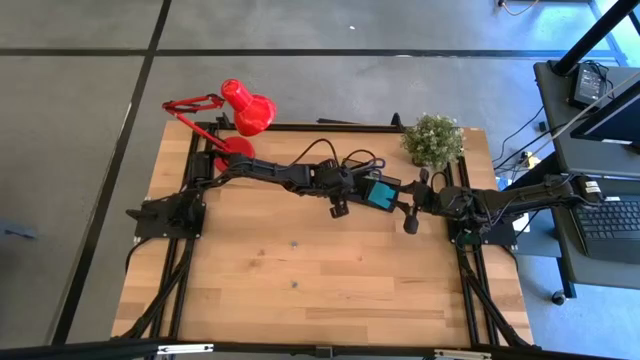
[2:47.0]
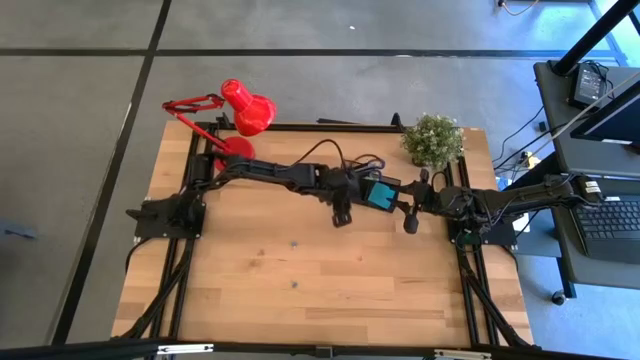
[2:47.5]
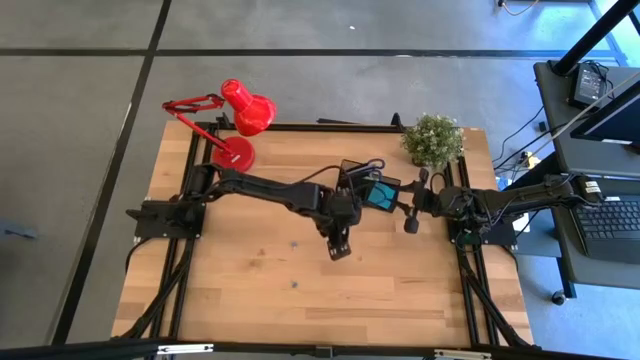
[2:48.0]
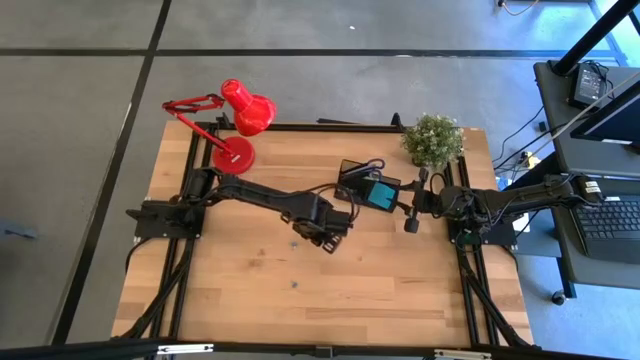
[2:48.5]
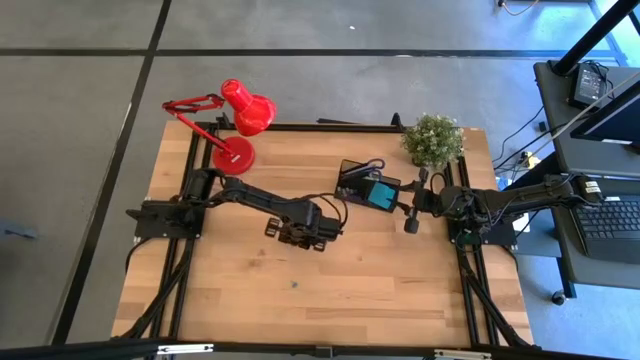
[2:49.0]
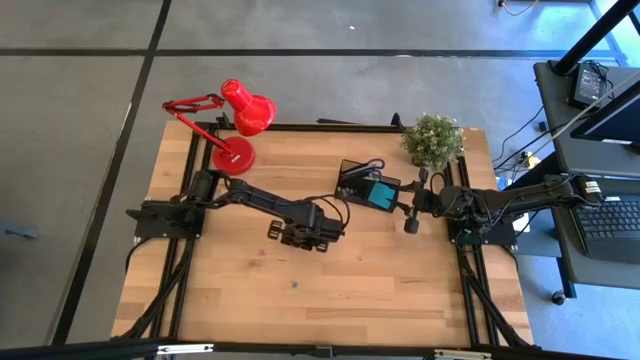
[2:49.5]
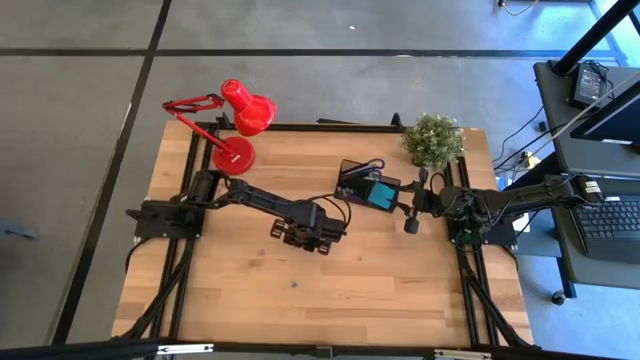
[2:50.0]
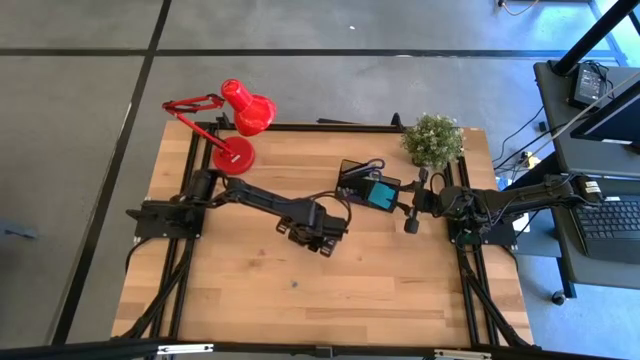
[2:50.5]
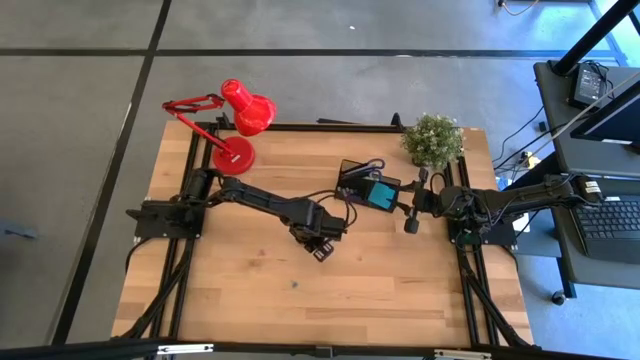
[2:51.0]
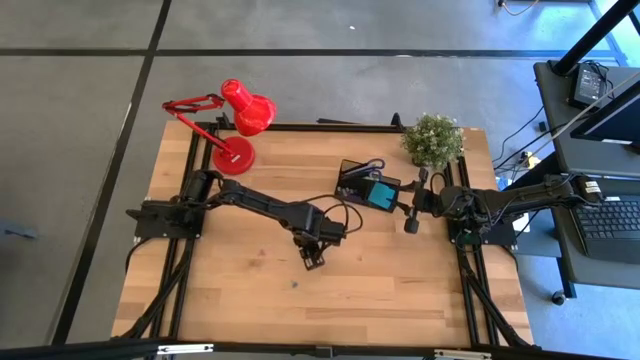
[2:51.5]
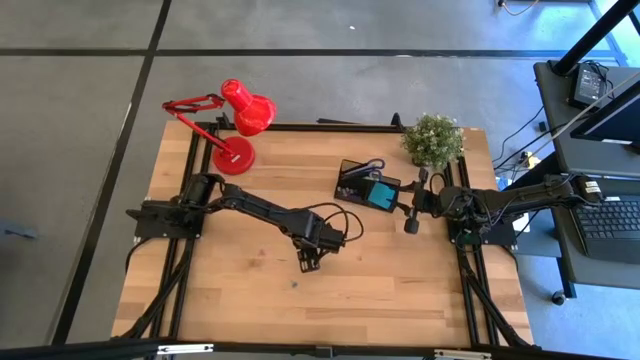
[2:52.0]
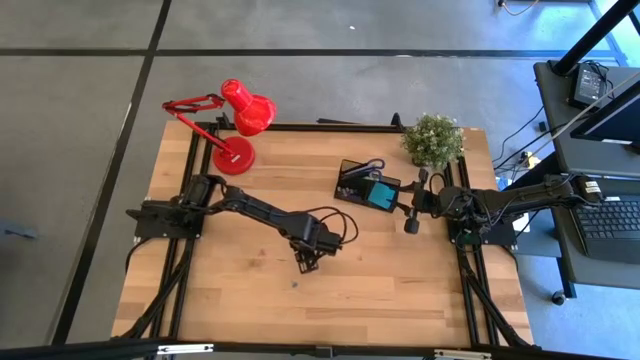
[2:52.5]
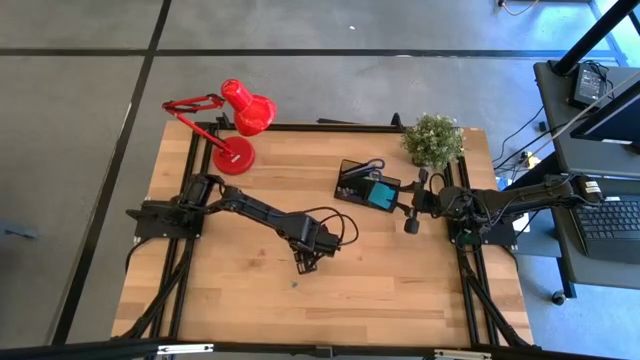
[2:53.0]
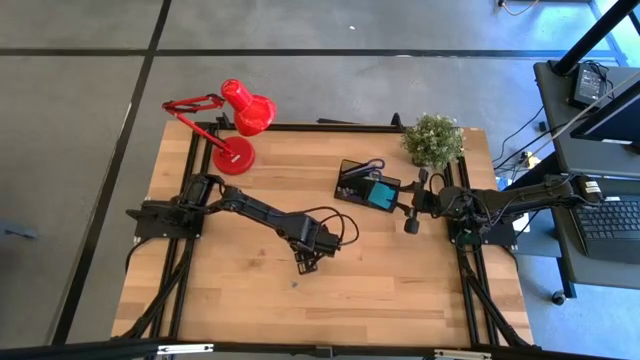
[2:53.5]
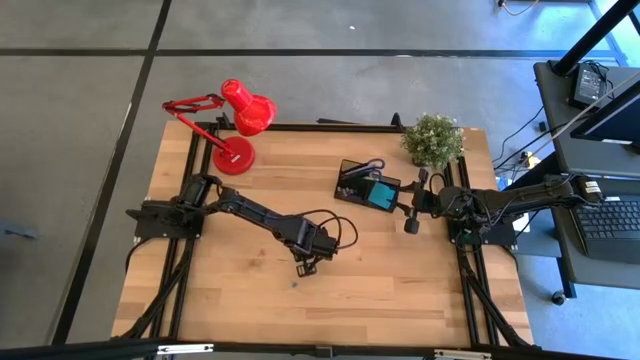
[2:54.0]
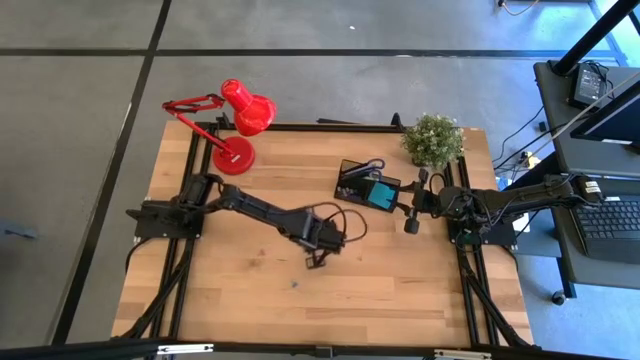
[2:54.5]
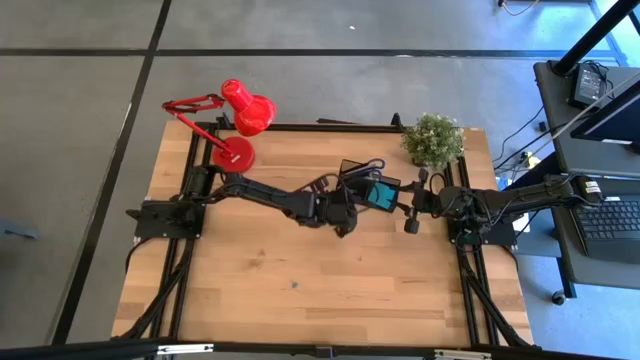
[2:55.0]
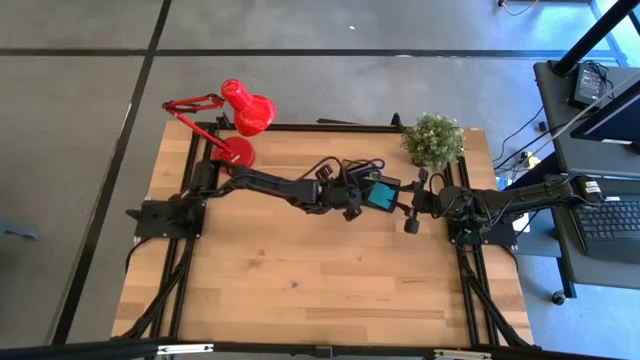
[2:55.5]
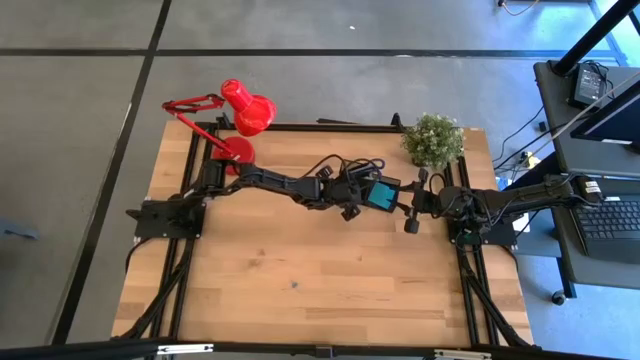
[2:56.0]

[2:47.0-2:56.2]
Task: Pick and place office supplies into organizer
Put the blue binder clip into the black desk organizer

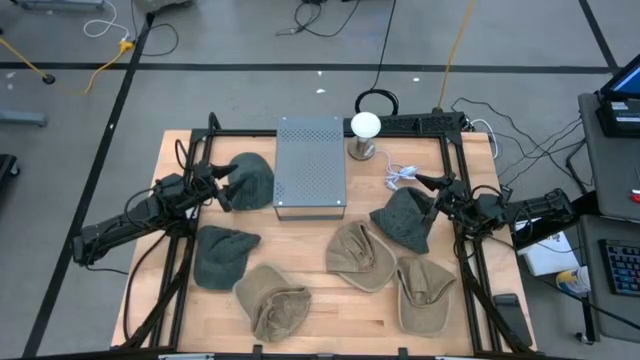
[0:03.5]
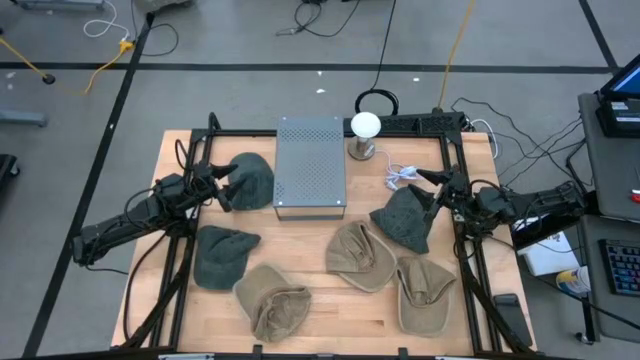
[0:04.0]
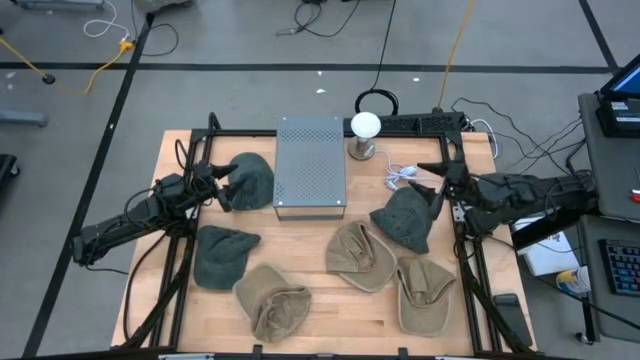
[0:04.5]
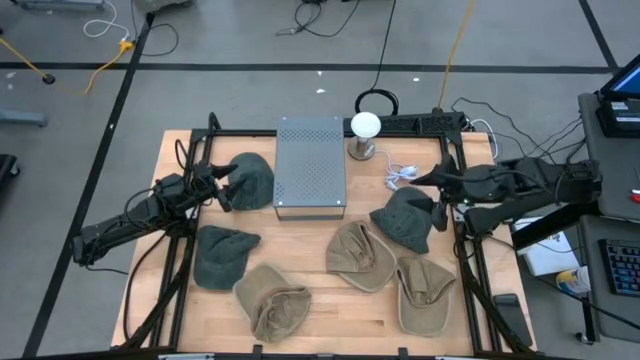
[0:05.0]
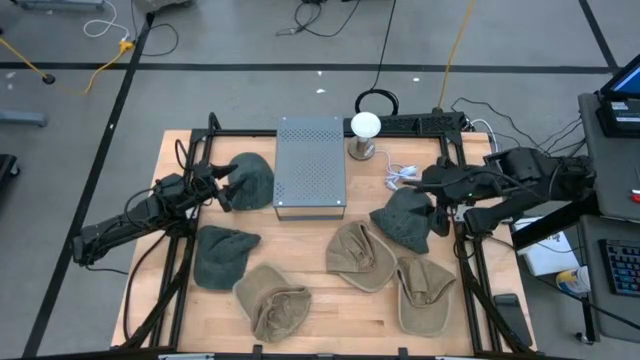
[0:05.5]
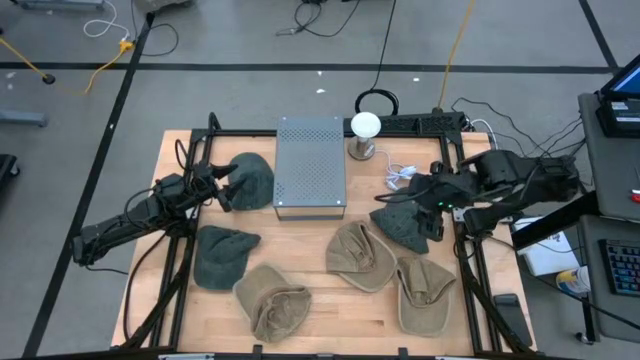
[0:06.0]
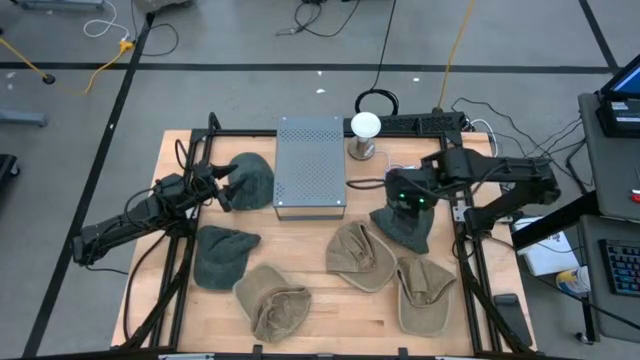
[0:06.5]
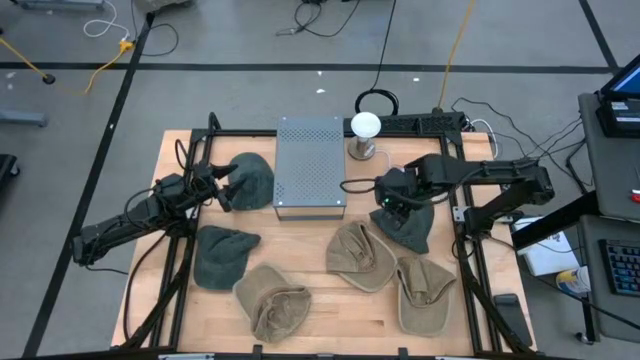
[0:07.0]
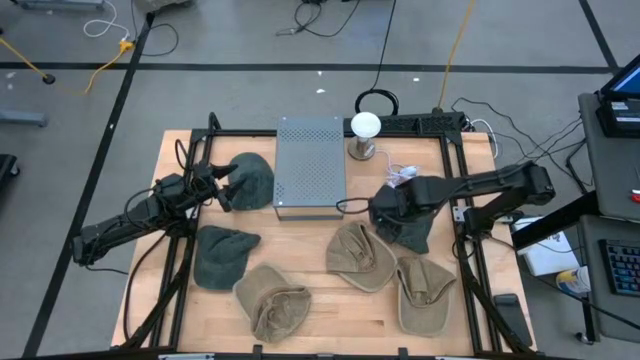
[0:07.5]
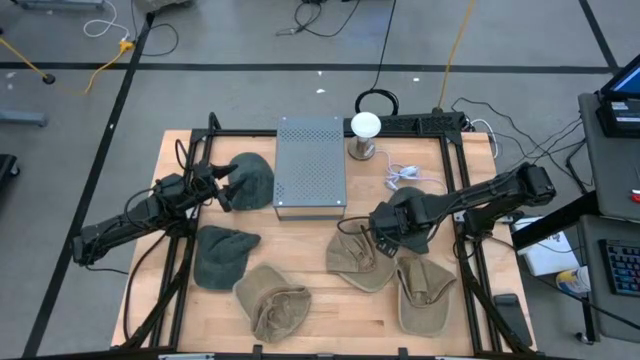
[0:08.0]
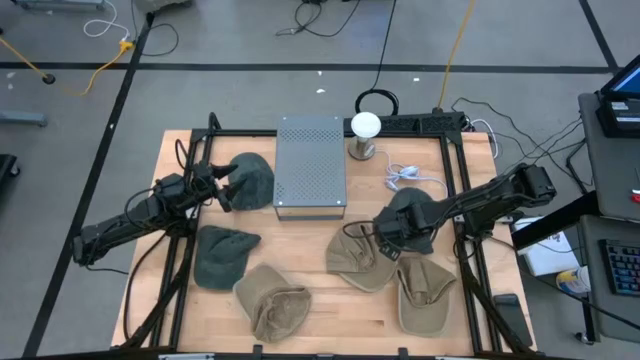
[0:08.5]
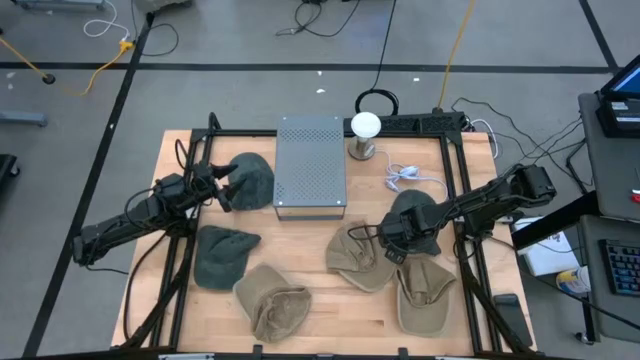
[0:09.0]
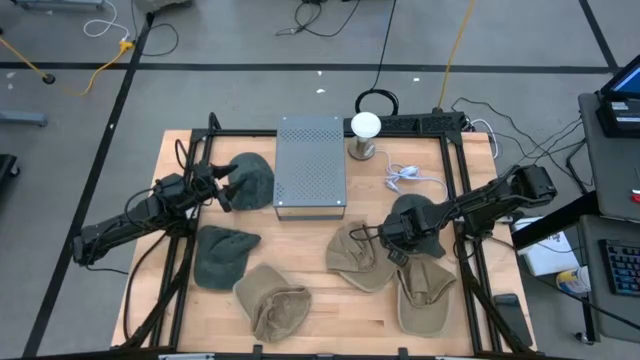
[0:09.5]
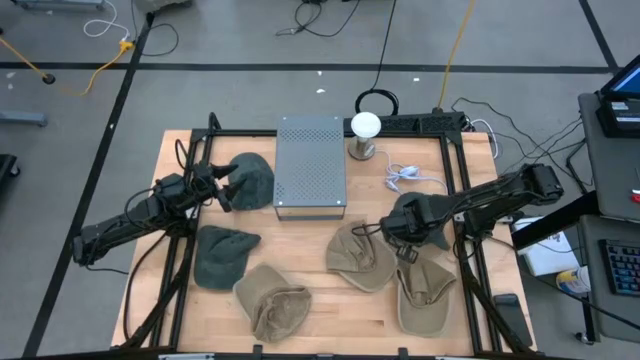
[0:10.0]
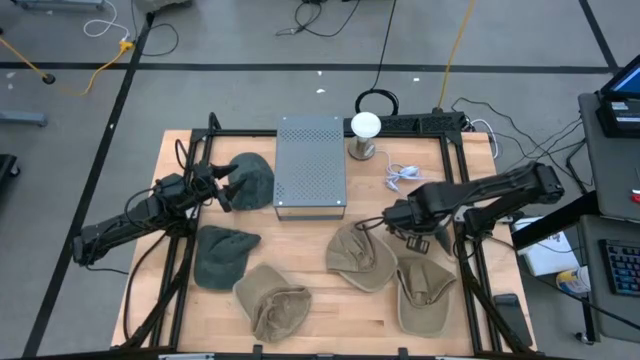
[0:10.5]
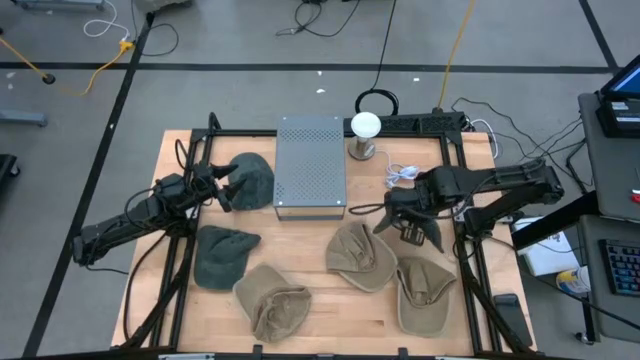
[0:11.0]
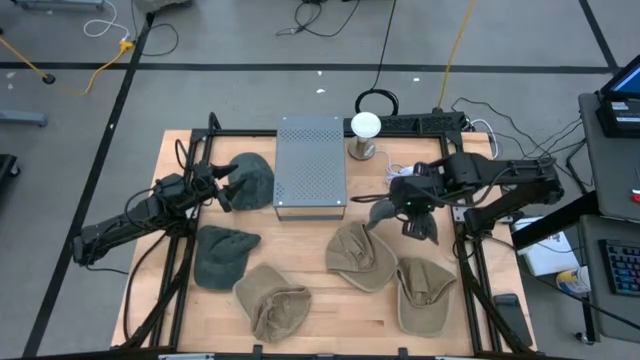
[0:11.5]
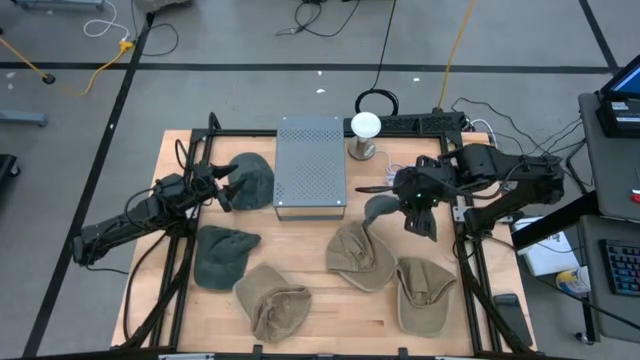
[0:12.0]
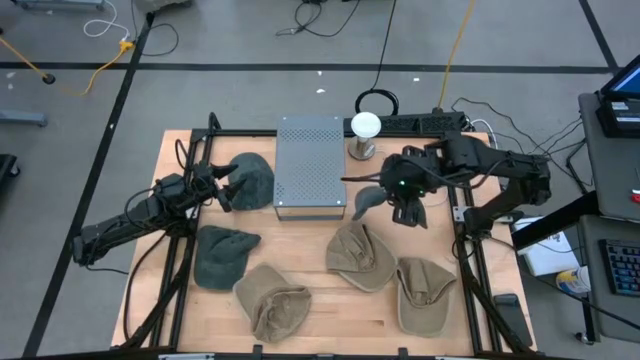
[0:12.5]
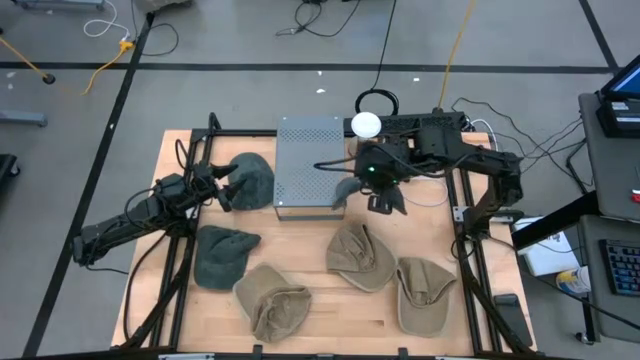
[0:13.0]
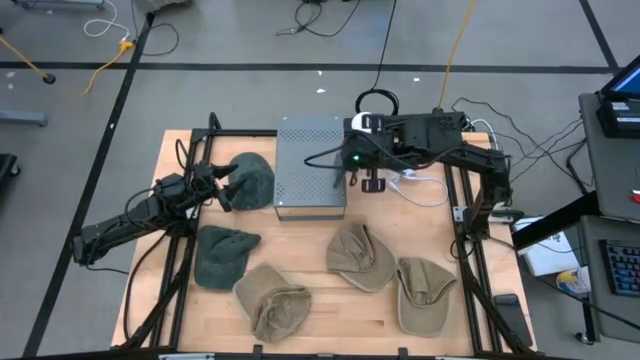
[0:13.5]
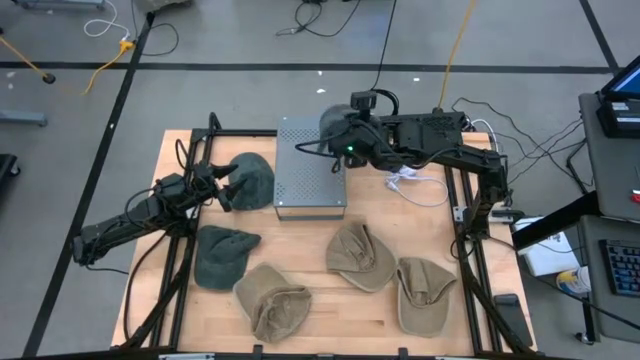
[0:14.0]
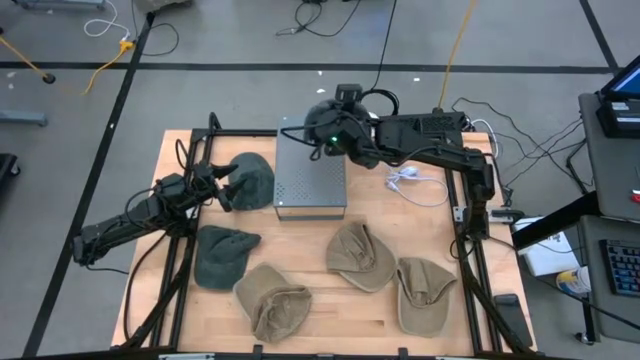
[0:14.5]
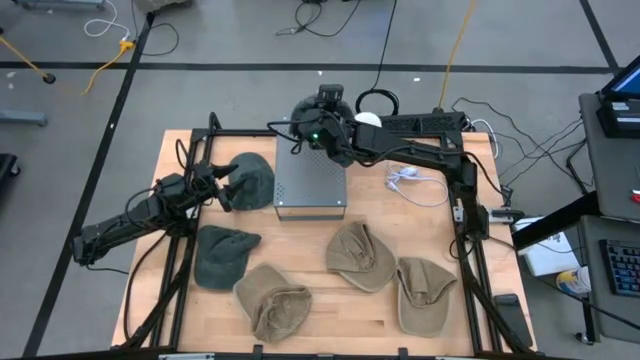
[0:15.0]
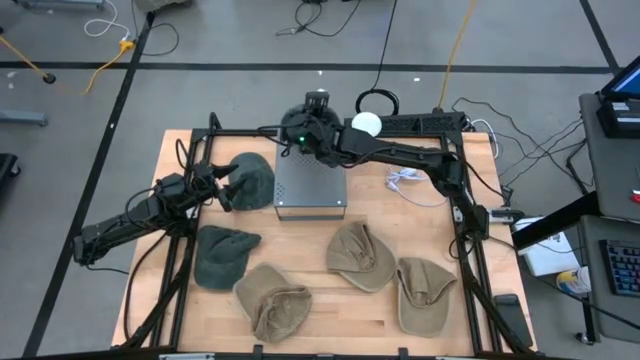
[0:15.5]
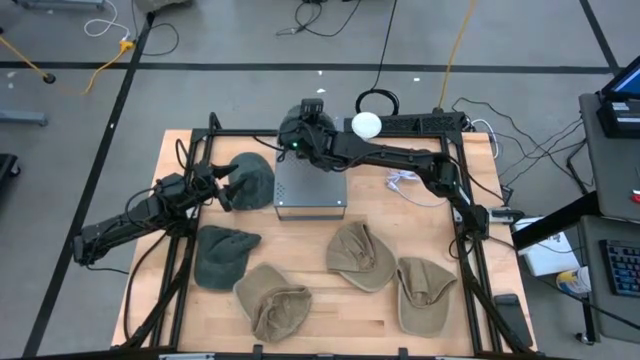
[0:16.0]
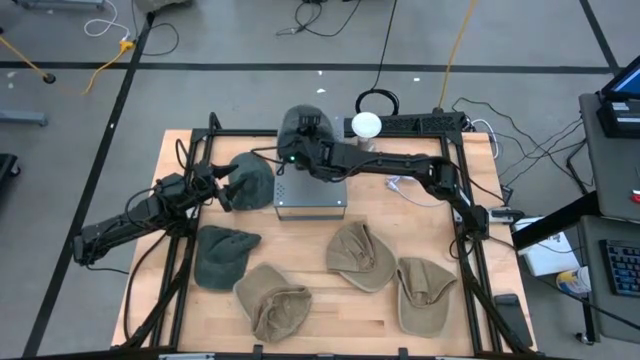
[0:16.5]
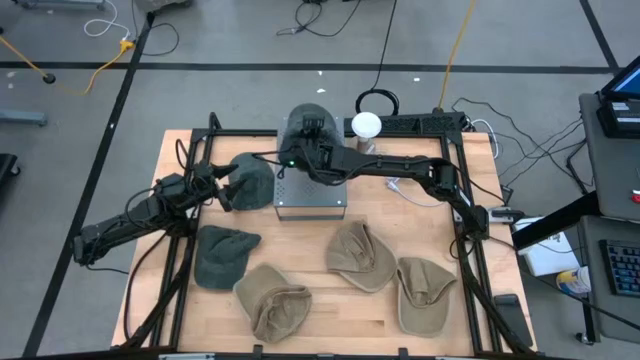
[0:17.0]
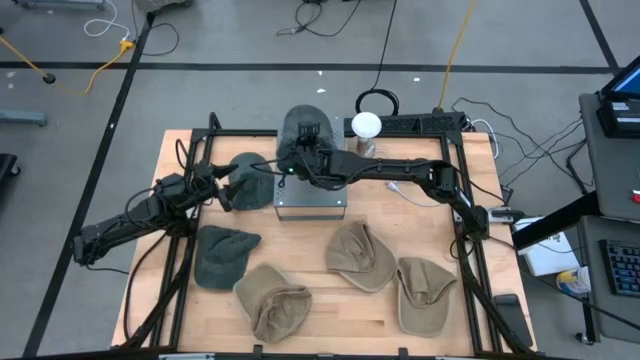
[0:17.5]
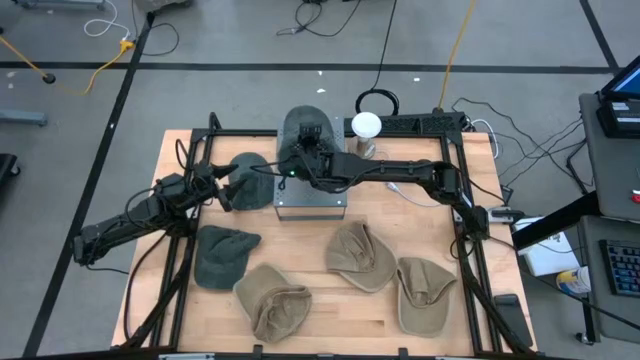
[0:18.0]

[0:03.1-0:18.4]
Task: Pick & Place hat
Put the right black cap on the shelf
